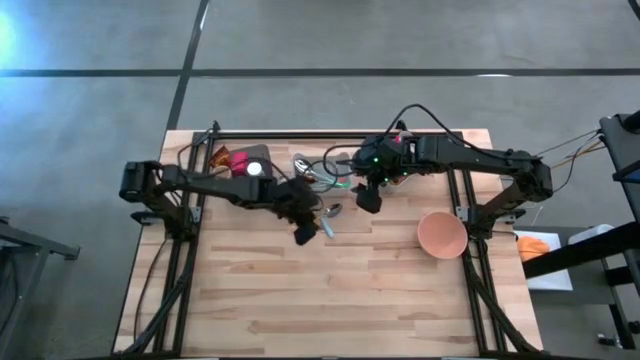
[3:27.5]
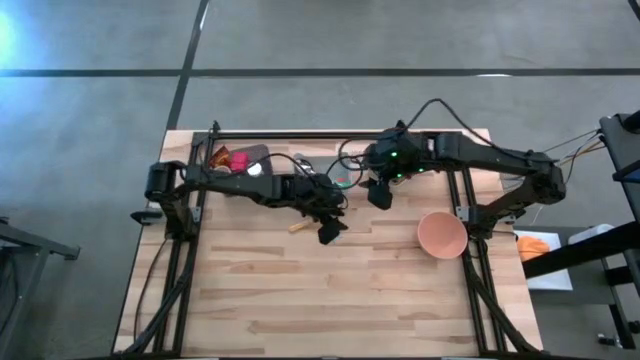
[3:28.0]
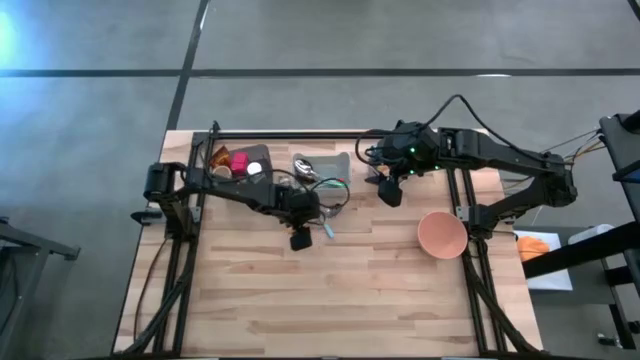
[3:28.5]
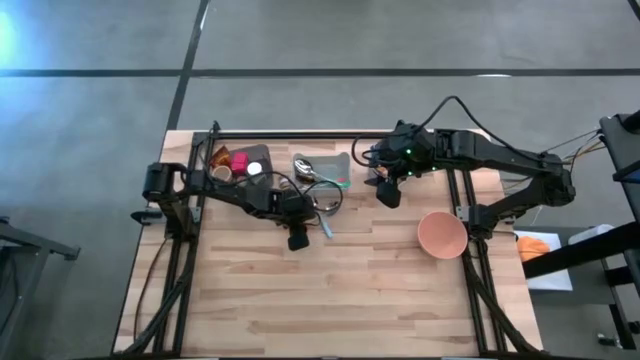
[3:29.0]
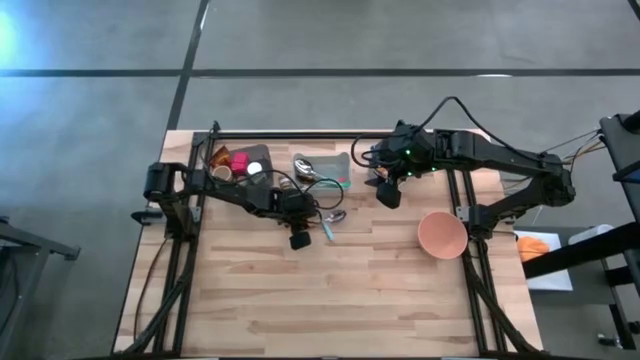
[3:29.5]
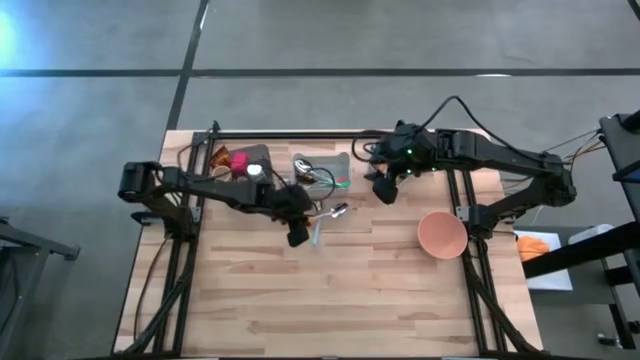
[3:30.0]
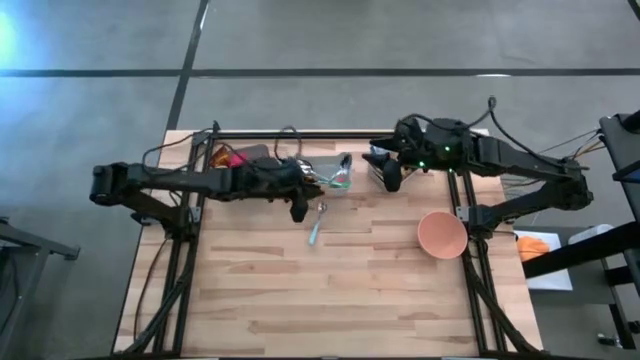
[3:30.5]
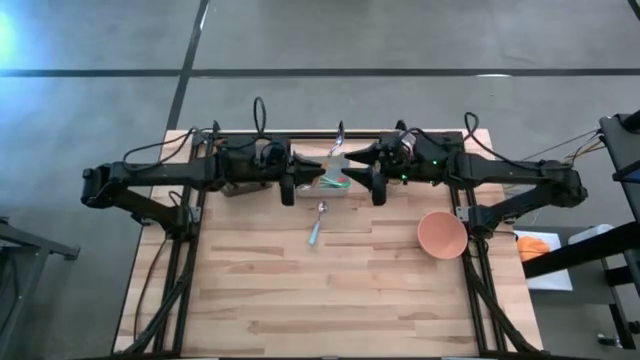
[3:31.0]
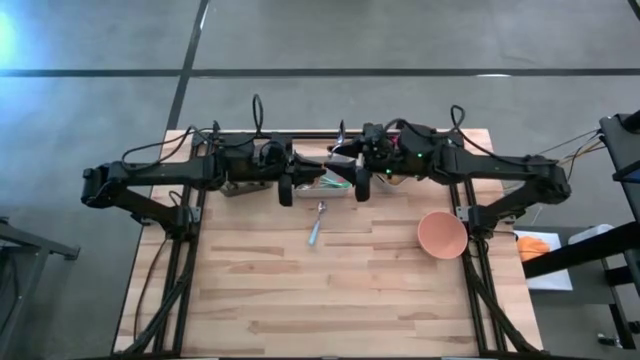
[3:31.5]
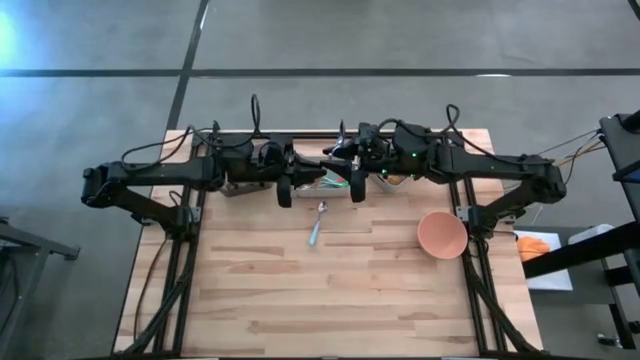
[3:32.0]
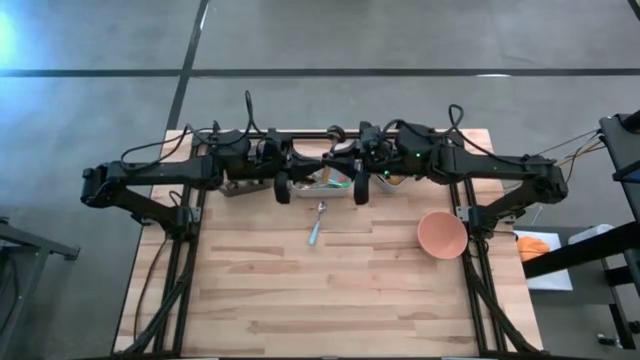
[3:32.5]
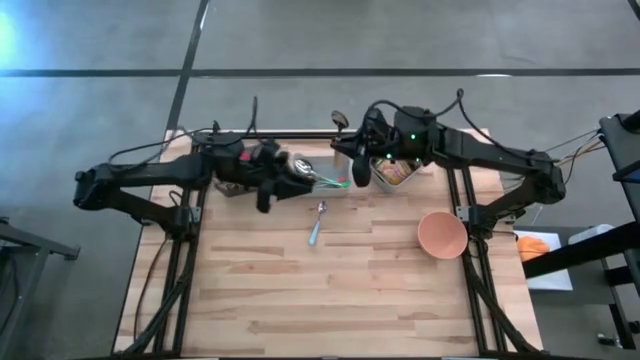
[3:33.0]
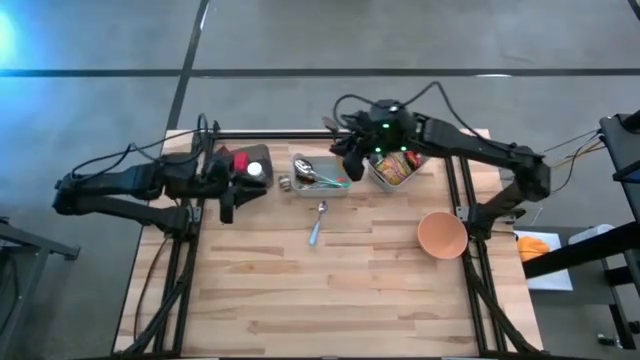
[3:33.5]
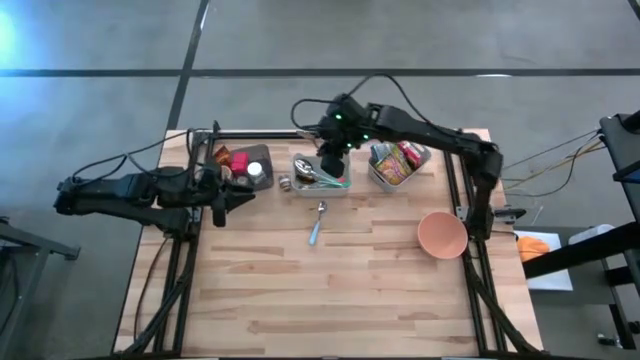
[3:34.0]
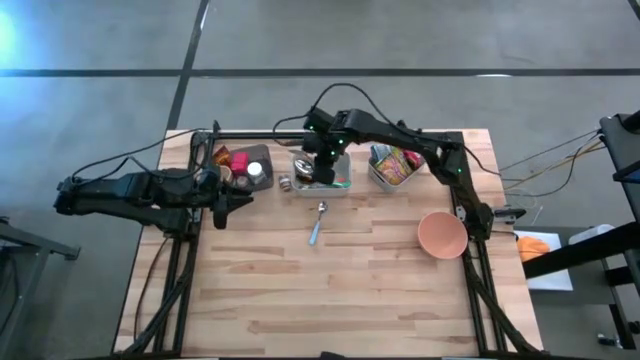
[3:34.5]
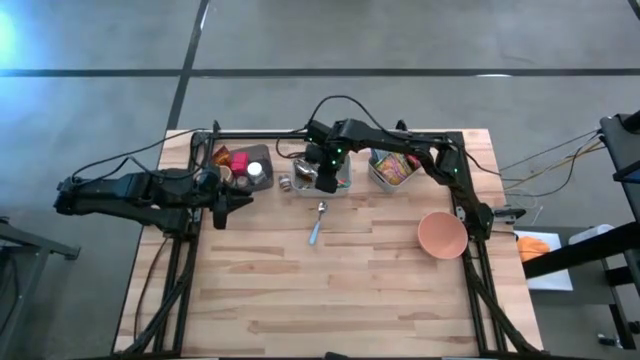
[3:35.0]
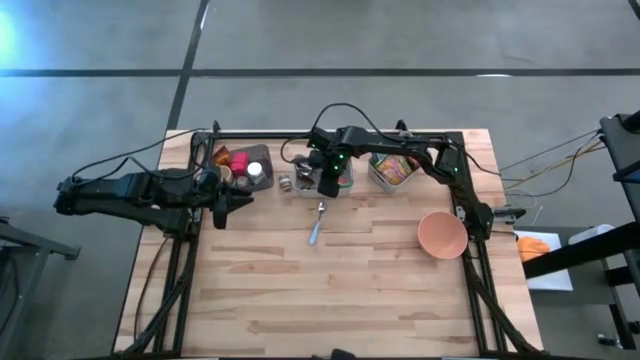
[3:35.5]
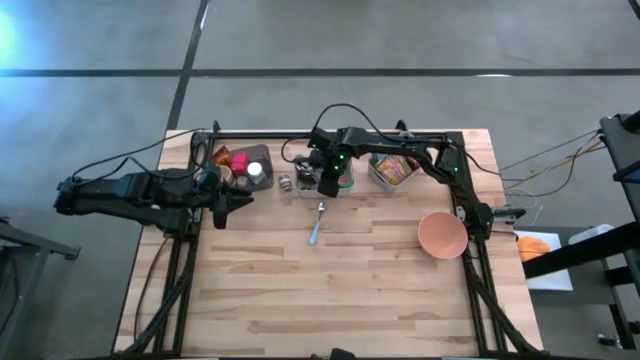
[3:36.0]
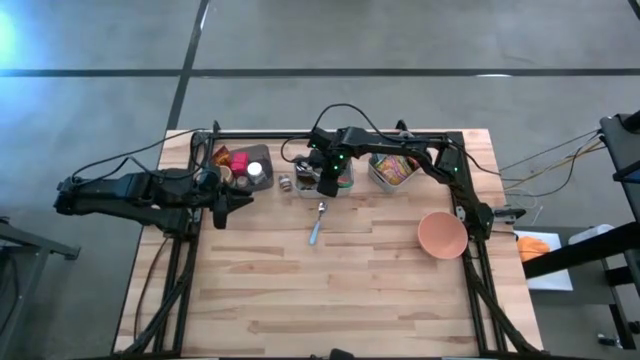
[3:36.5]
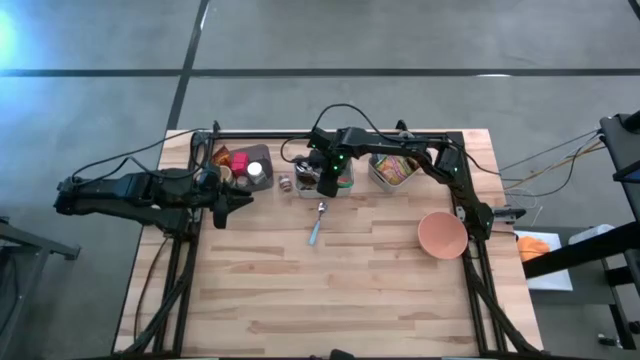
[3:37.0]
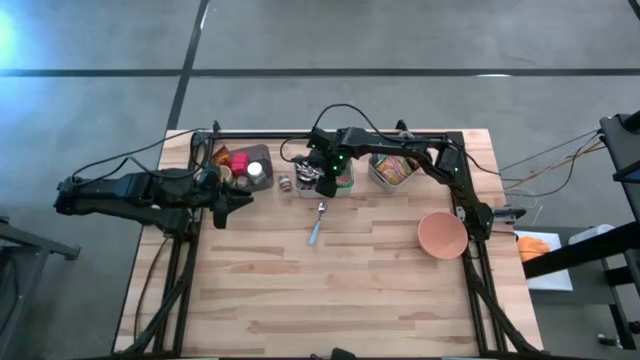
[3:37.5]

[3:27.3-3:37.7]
Put the orange spoon into the right gray bin

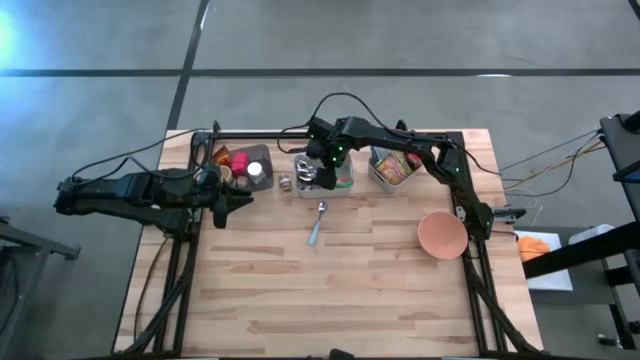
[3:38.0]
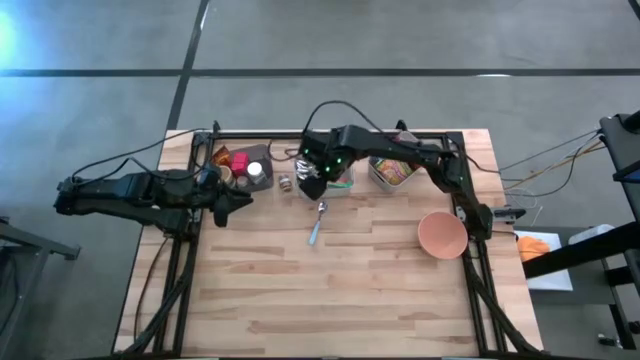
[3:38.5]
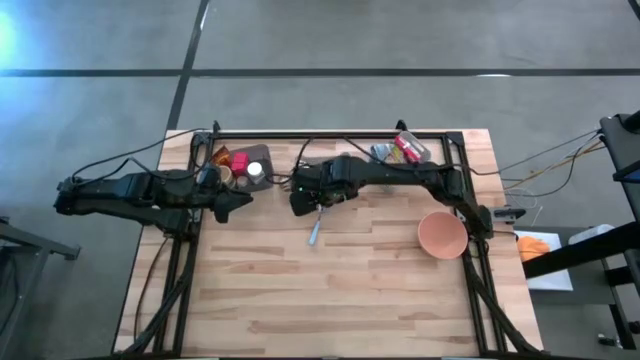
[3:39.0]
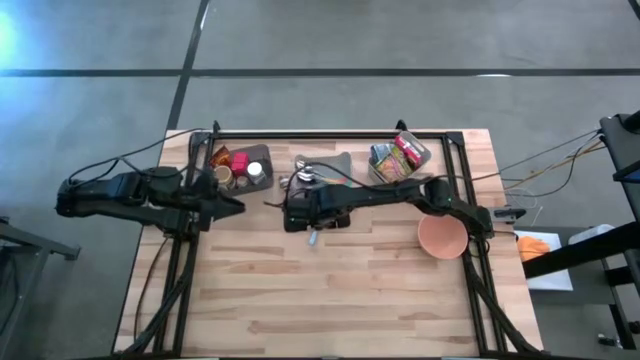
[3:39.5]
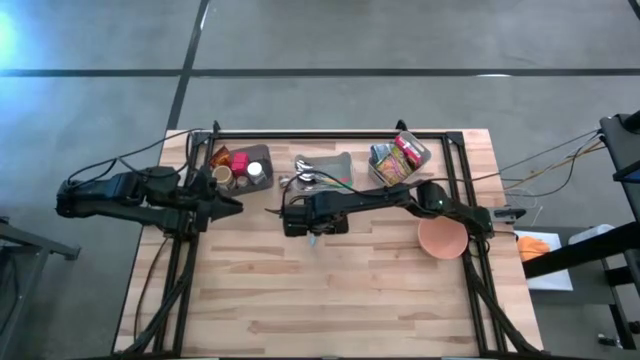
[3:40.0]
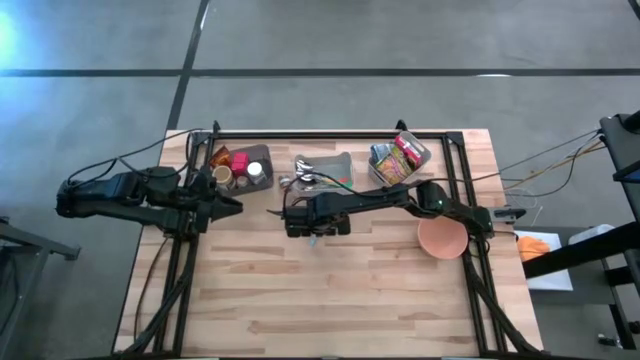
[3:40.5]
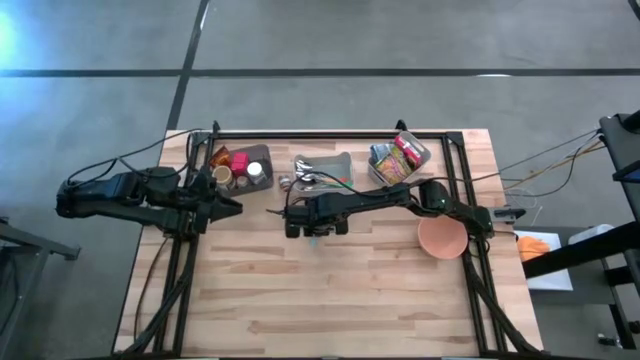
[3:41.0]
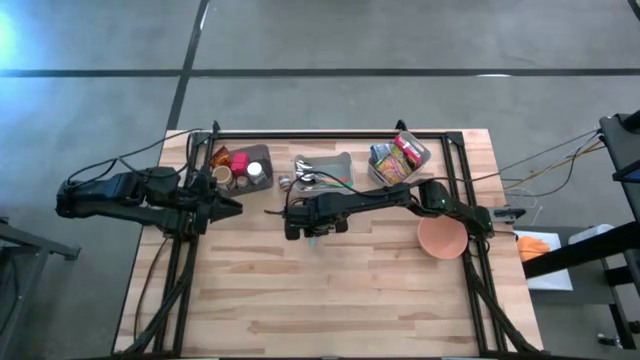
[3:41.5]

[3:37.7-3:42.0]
Put the small blue spoon into the right gray bin
